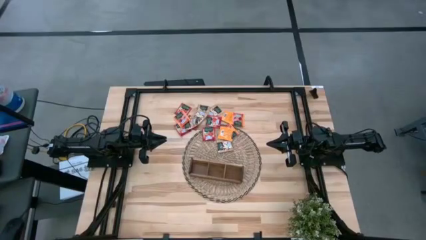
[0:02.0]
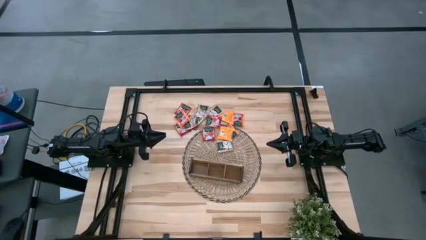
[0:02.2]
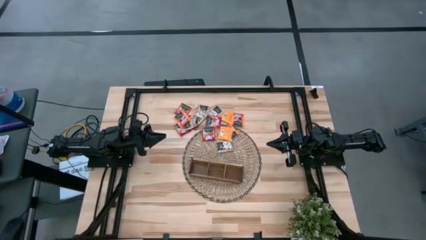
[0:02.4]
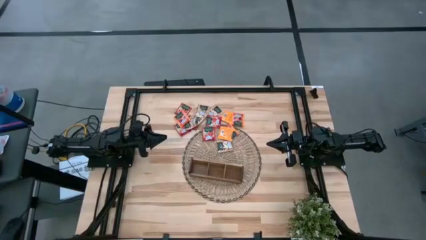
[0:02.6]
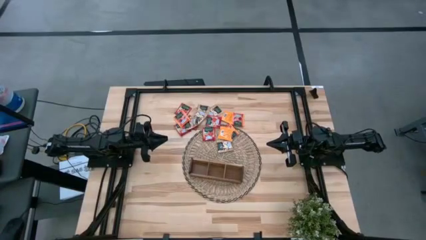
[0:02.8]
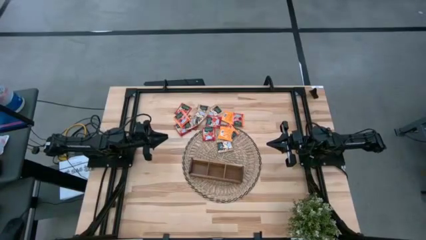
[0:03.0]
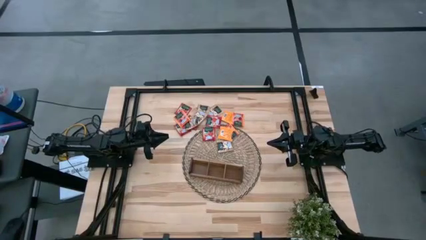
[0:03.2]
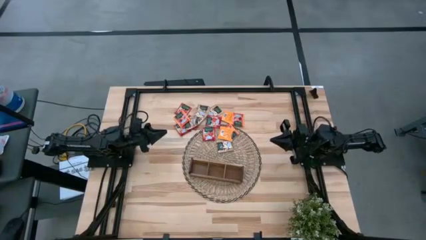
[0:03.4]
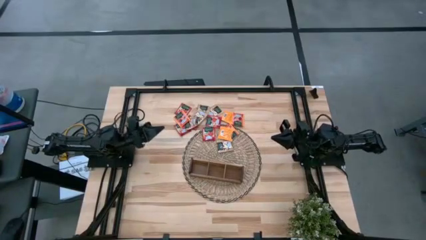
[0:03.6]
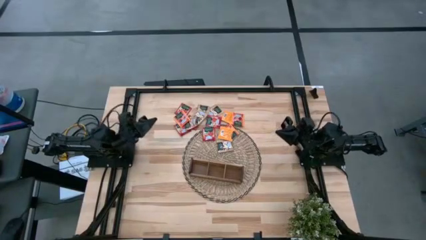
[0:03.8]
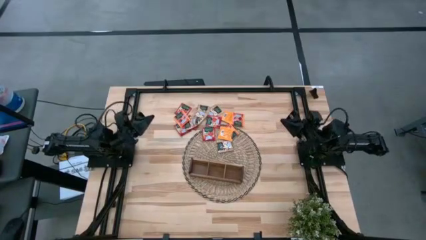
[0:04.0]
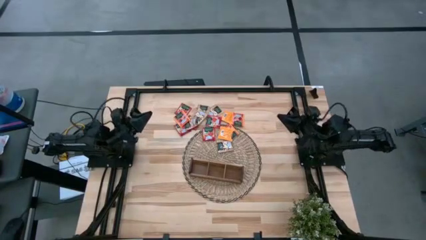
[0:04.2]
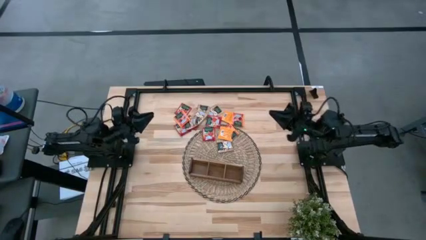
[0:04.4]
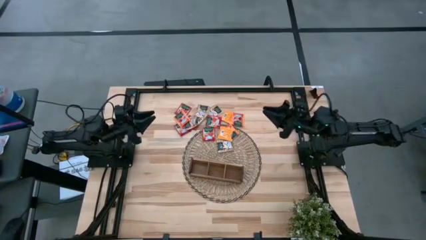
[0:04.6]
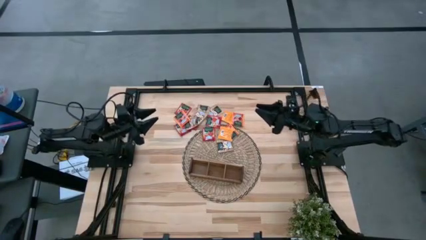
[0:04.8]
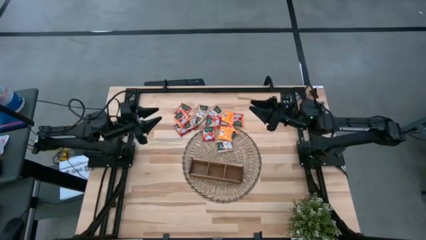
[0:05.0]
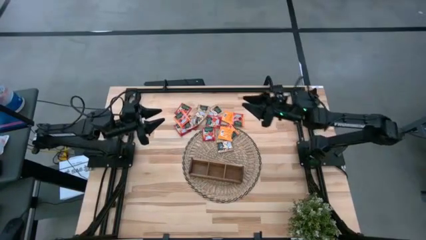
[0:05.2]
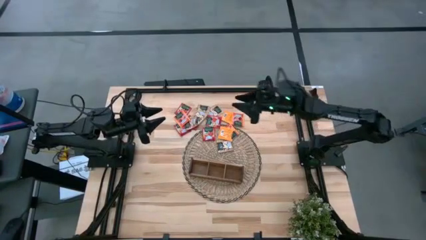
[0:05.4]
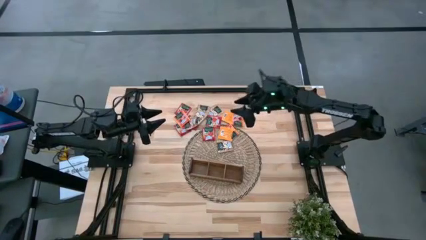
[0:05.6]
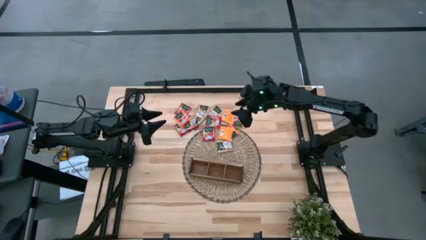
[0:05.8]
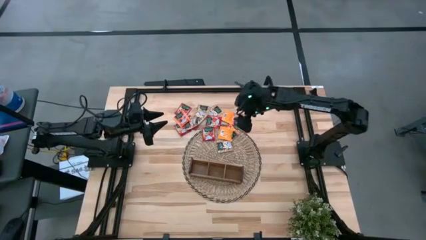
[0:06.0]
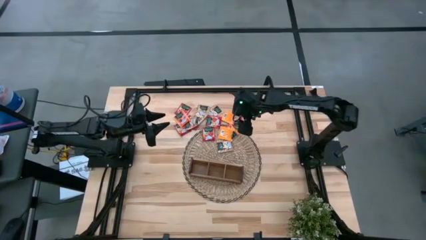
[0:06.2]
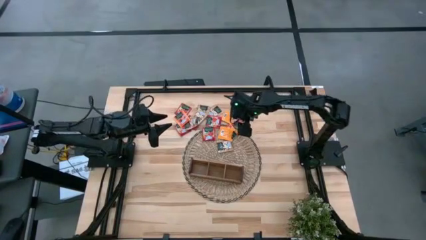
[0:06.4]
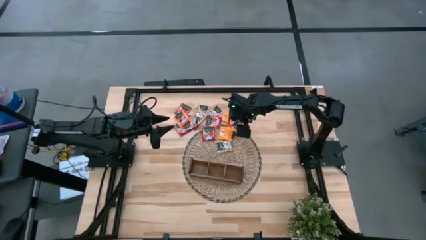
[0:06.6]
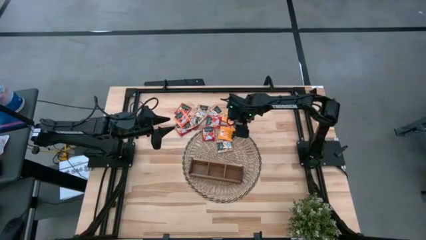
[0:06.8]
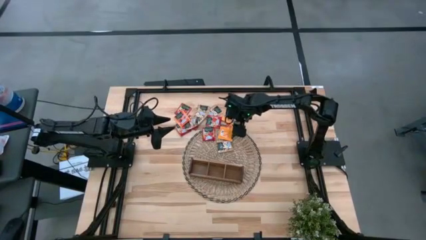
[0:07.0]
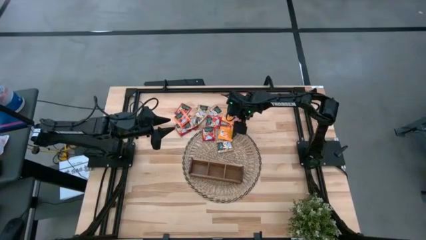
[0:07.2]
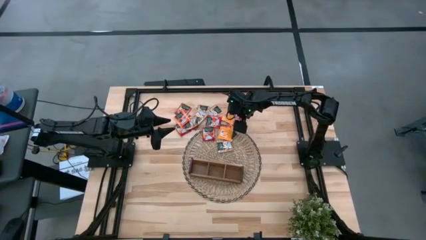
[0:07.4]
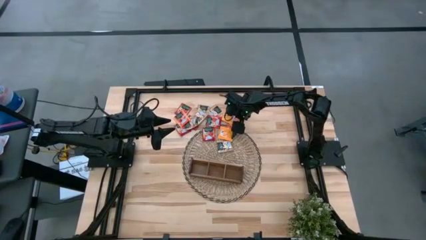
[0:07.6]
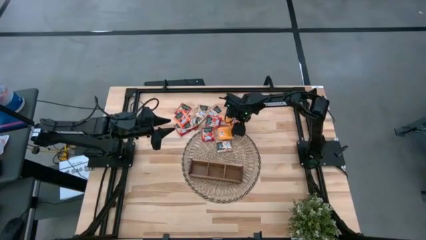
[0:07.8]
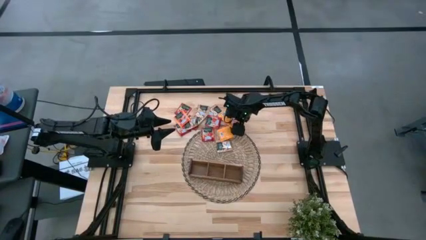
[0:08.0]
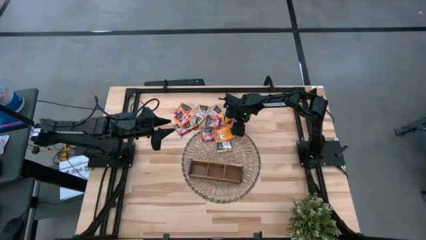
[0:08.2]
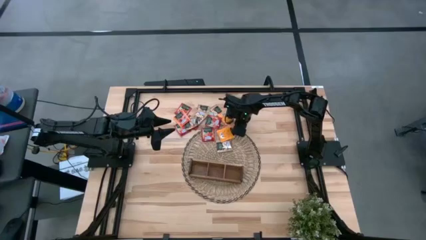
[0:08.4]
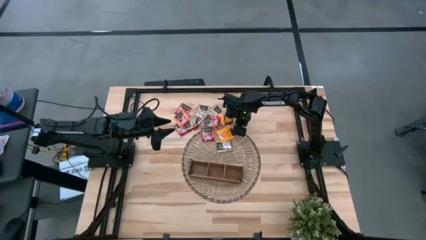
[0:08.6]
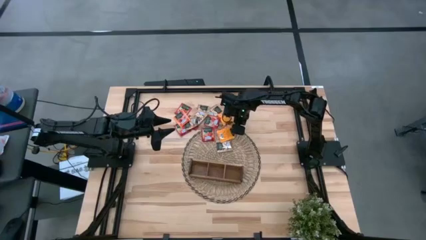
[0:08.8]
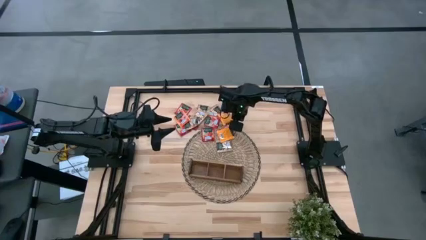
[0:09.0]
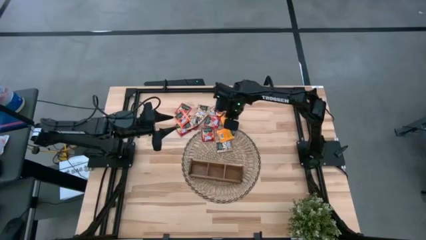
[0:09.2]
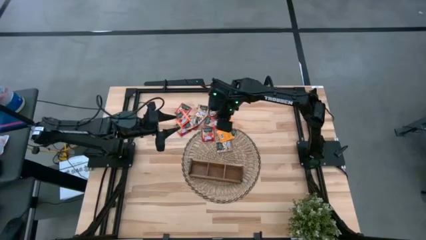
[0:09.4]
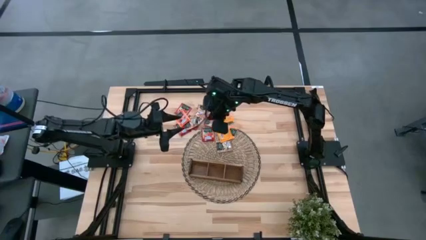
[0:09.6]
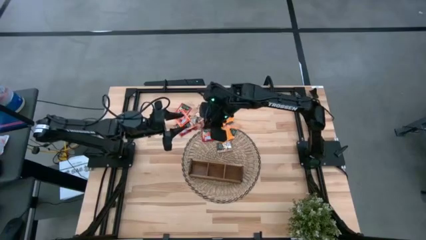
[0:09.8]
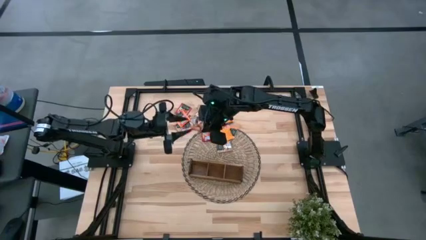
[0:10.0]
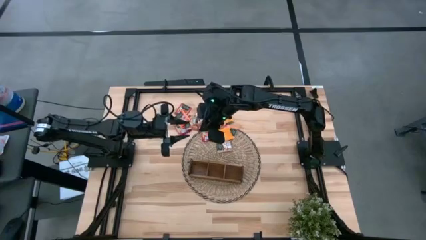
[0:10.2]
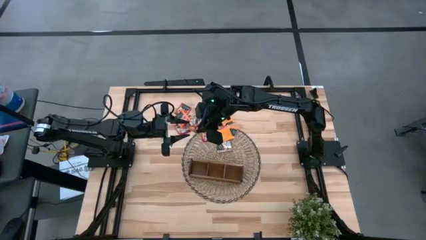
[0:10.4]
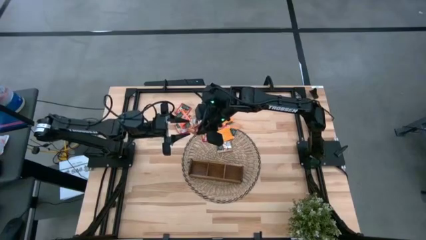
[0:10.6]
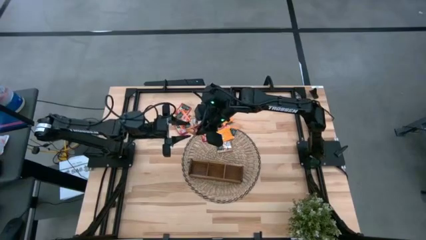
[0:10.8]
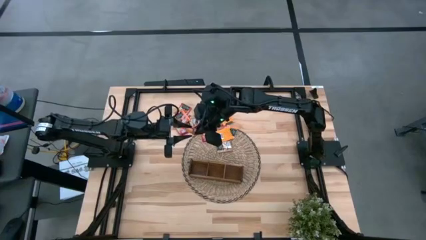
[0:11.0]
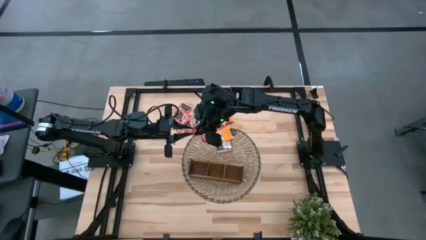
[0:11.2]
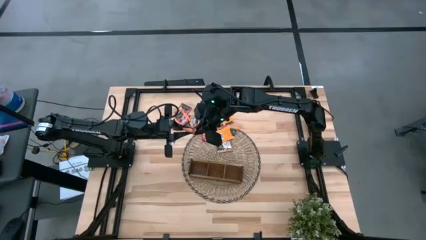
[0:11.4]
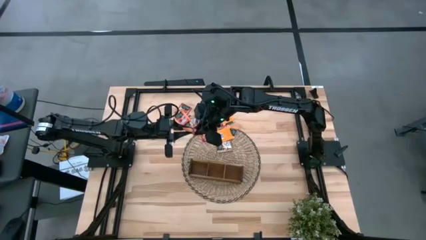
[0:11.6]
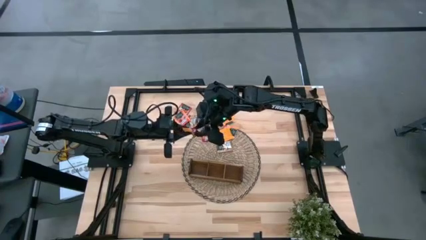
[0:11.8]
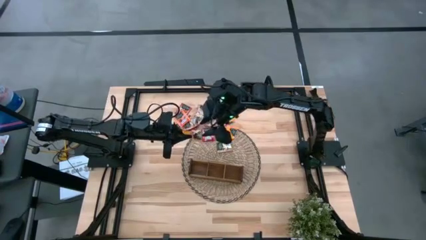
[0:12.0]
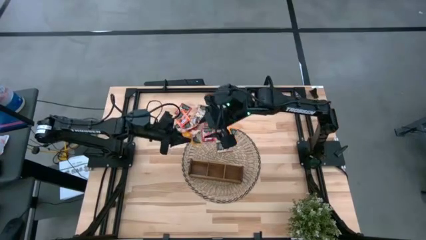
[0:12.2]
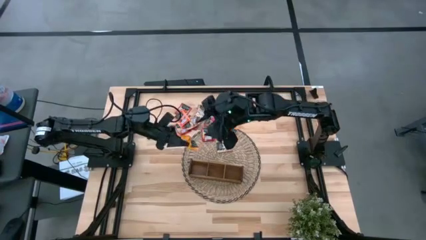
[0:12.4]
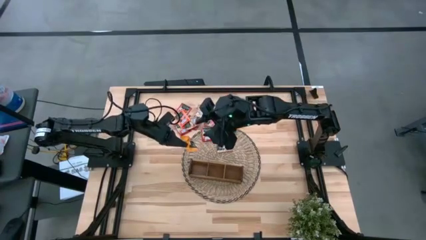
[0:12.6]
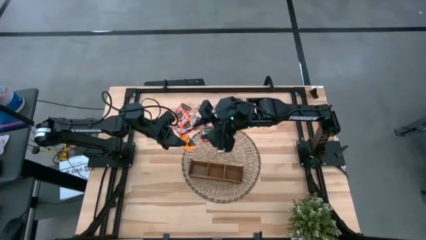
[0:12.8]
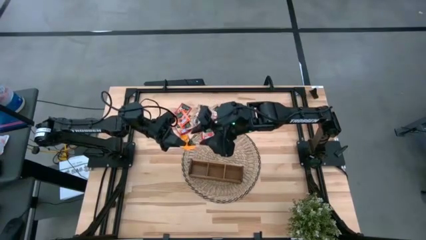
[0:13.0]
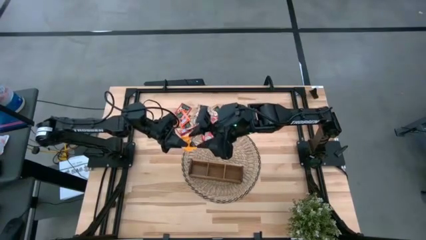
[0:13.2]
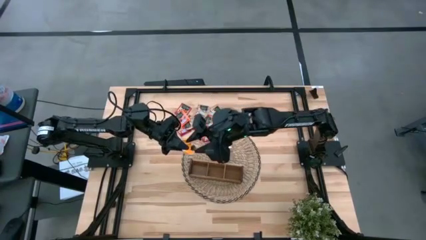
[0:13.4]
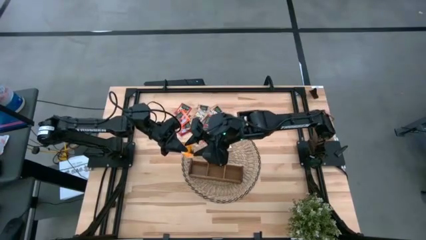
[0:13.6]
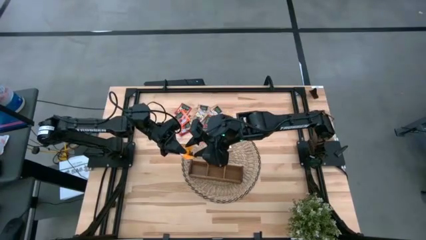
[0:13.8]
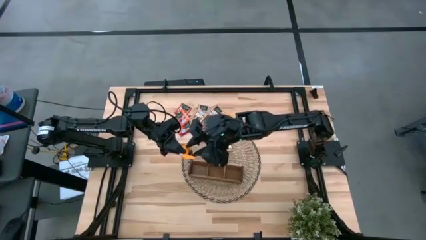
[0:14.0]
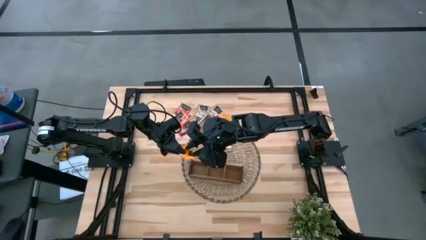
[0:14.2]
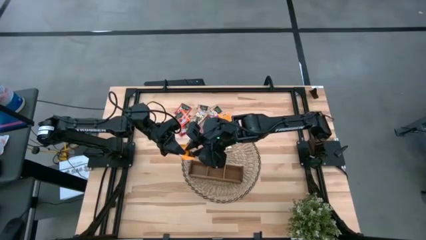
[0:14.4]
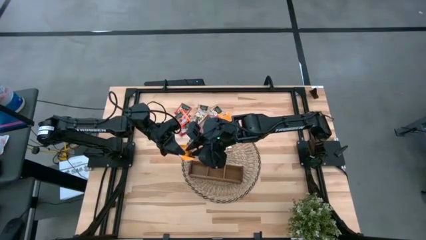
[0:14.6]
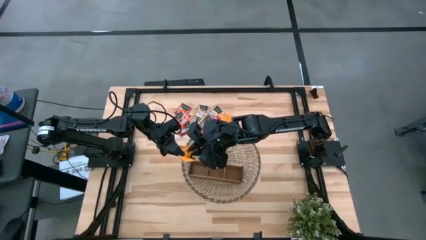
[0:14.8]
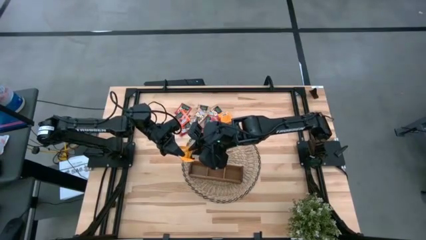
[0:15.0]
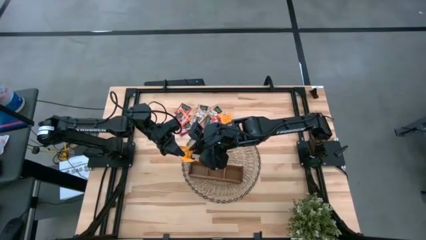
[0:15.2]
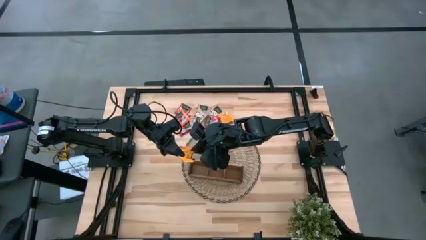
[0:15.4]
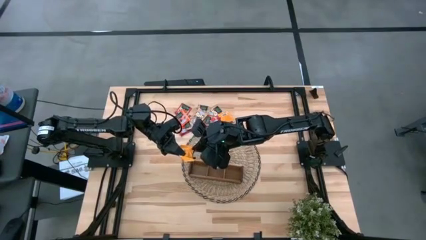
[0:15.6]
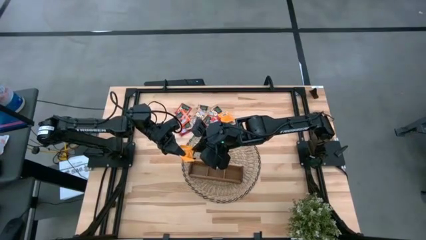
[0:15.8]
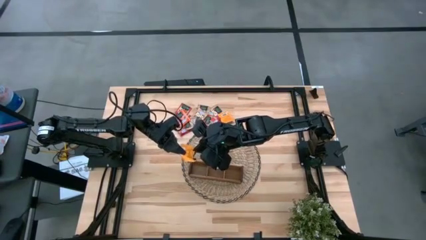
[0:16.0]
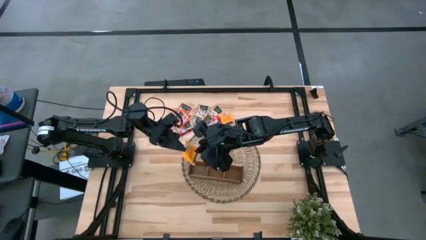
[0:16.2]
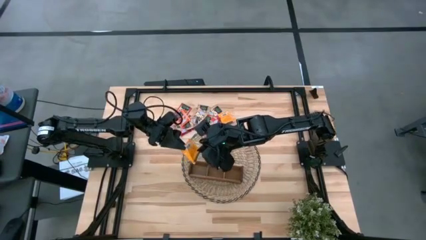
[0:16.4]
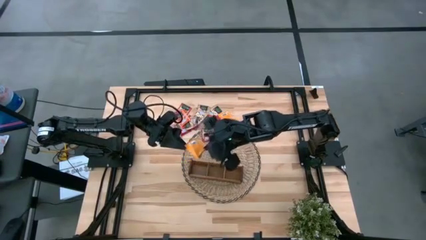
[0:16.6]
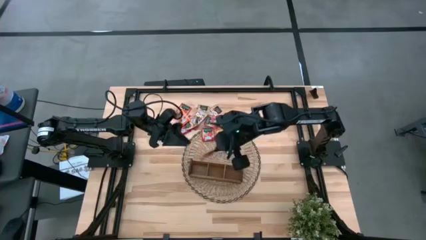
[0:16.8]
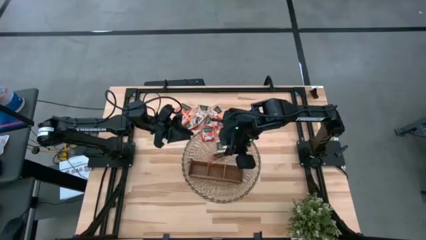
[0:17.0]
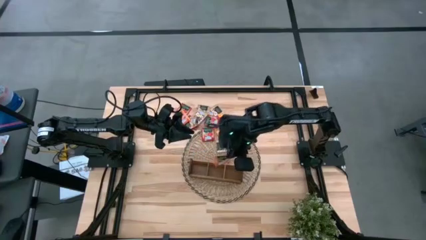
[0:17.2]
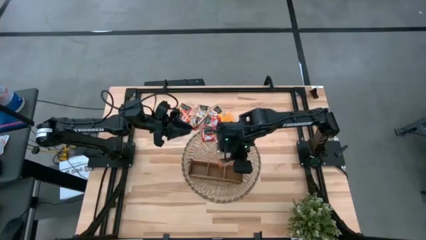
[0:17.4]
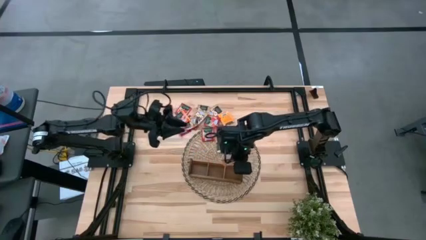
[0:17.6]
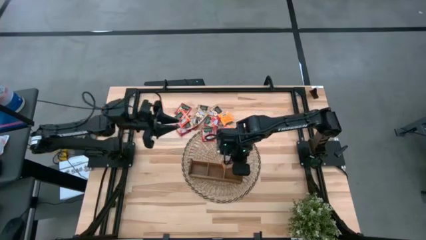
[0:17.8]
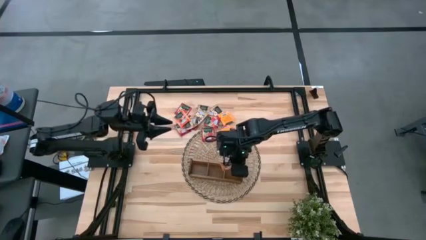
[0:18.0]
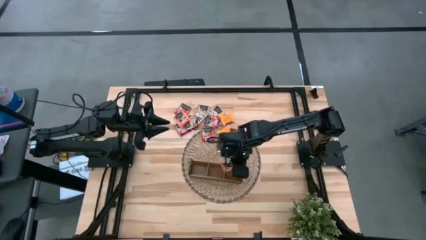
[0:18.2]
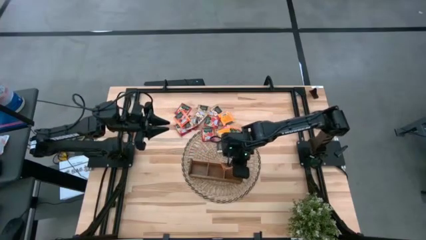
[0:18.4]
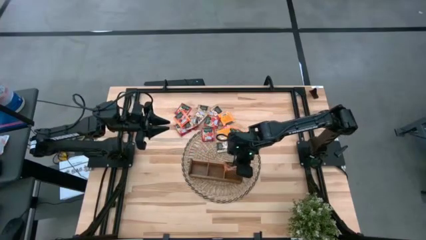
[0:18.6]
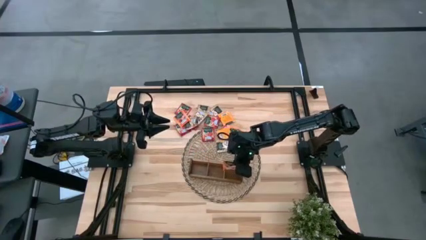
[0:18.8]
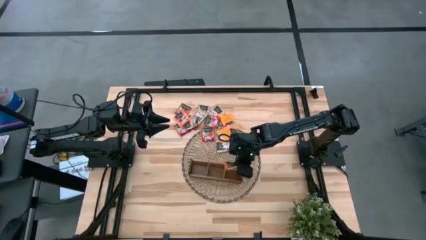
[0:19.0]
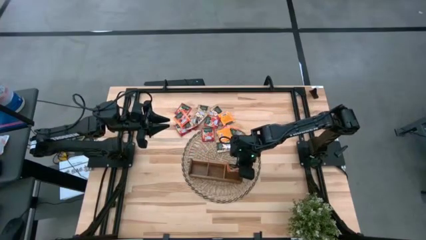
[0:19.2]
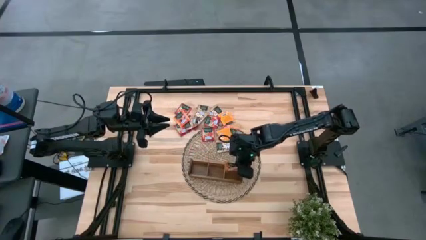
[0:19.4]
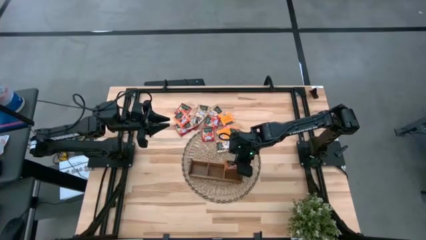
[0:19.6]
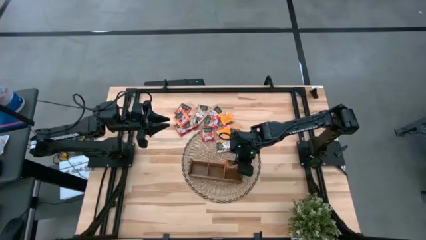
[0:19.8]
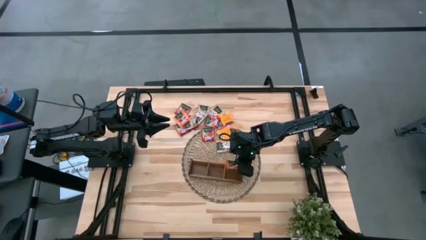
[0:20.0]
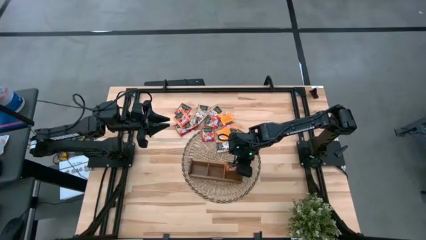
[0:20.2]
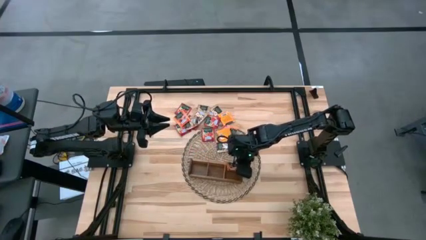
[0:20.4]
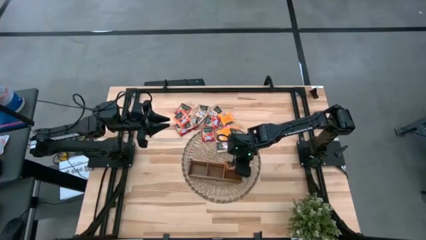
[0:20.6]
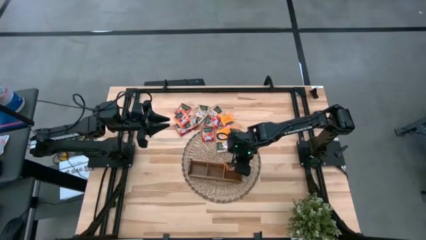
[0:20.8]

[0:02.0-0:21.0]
Task: Pick & Place Tea
Put the orange tea bag into the right section of the wooden organizer
